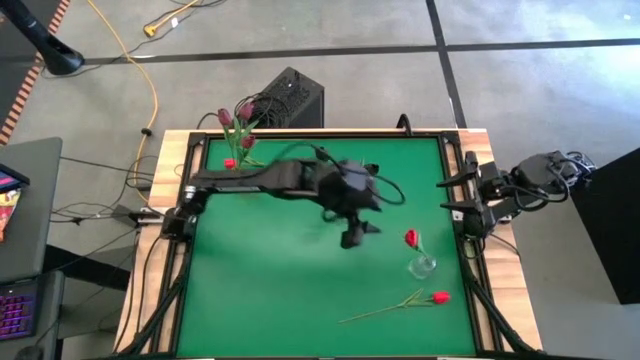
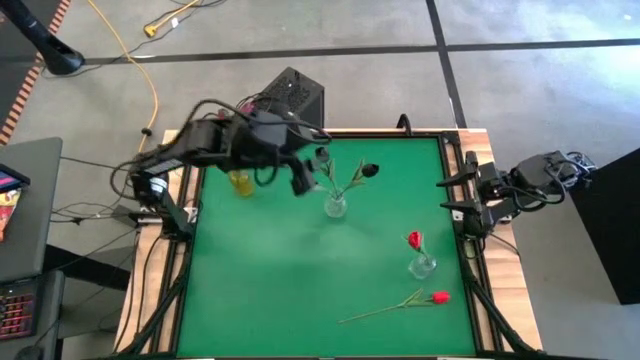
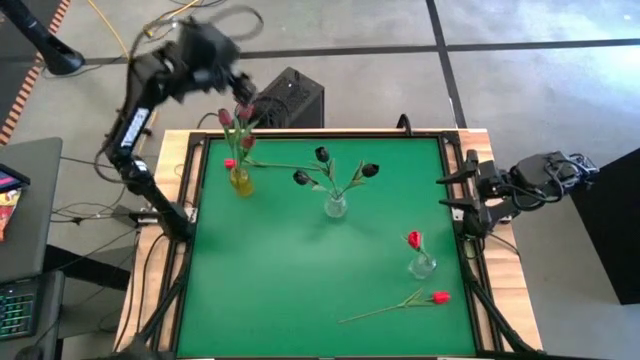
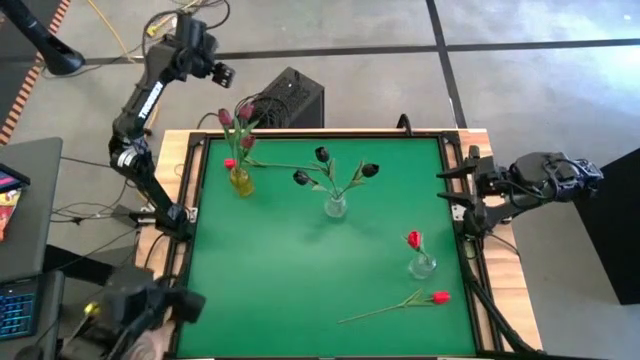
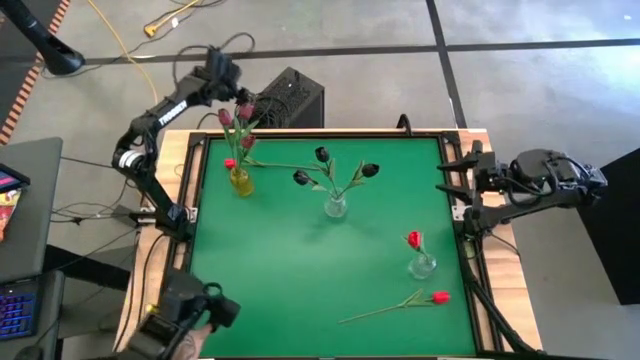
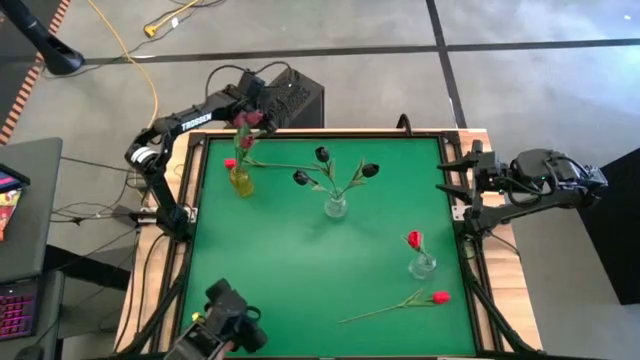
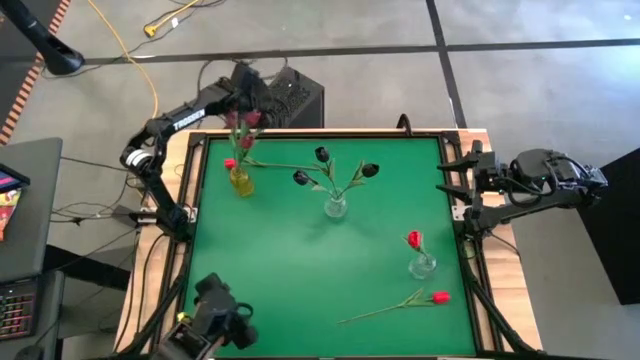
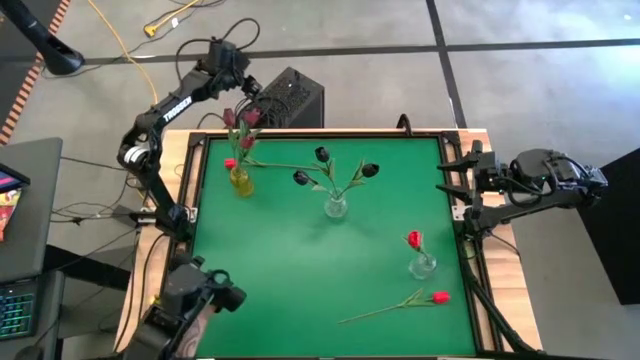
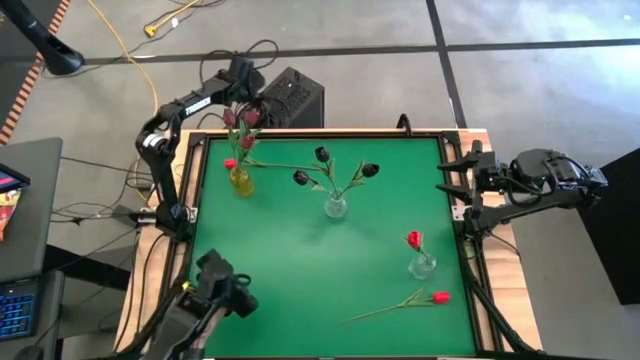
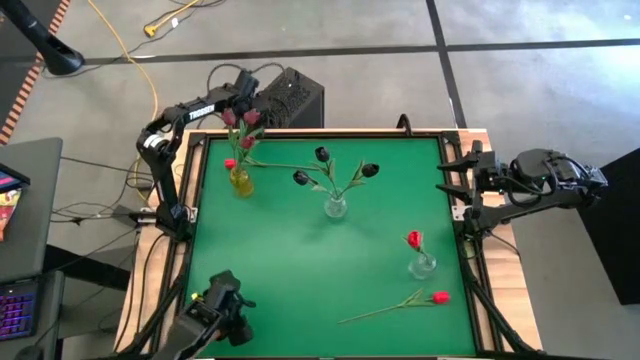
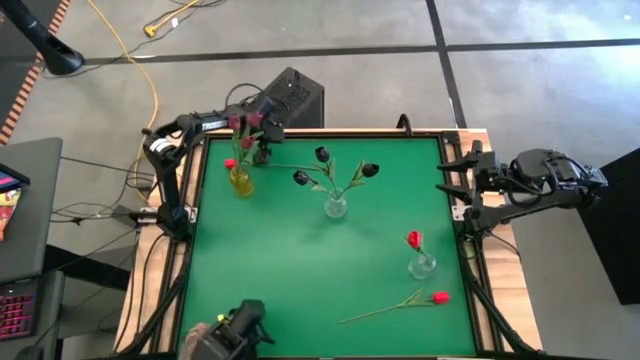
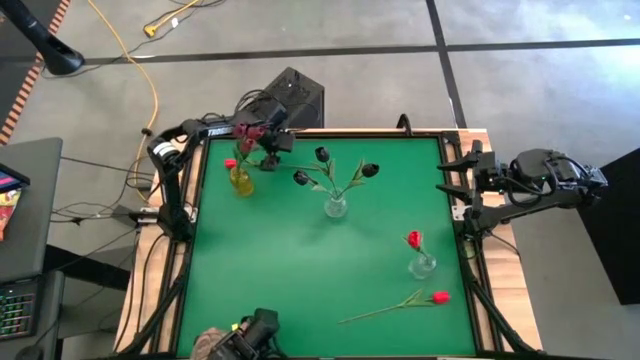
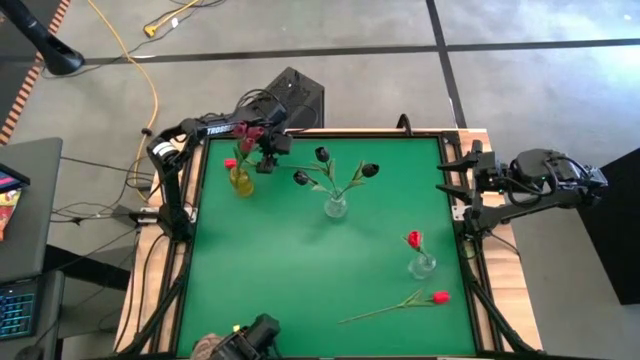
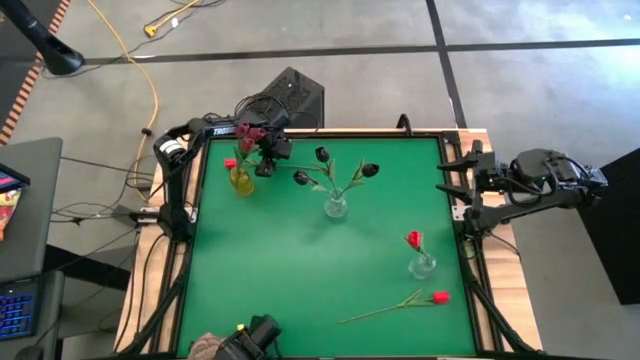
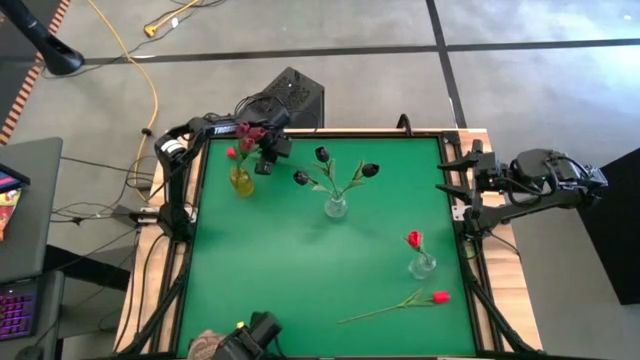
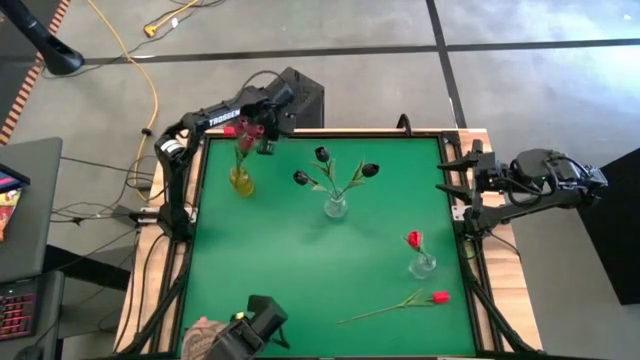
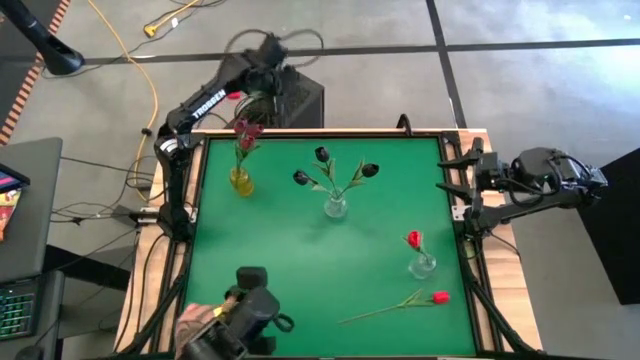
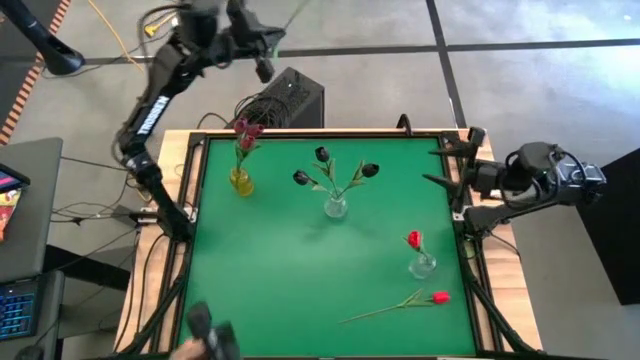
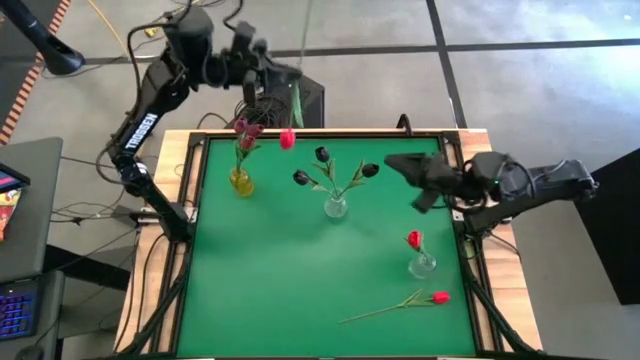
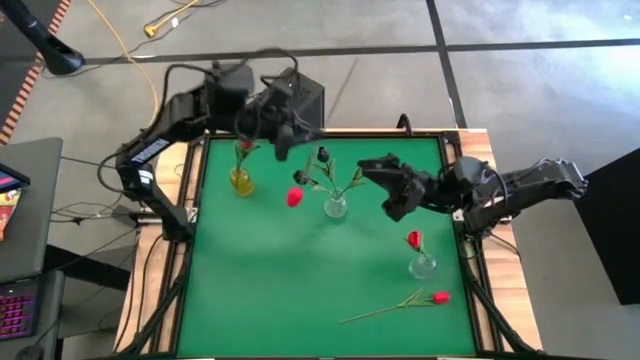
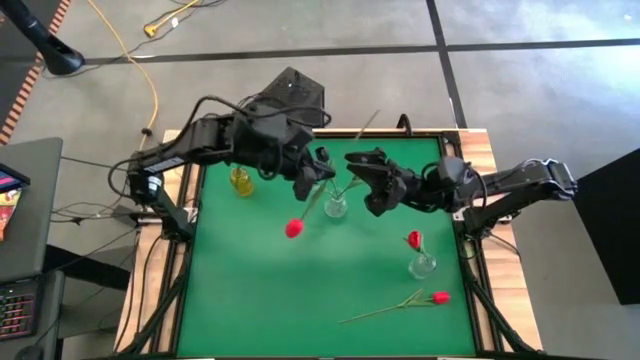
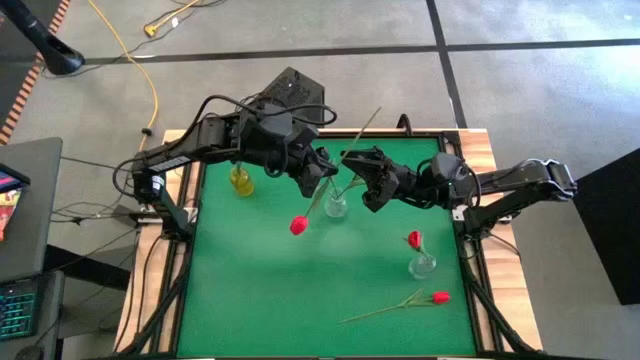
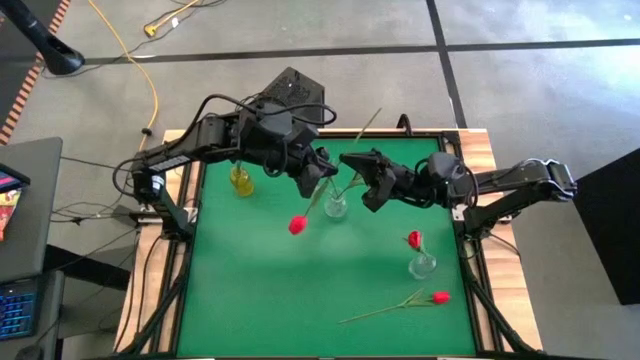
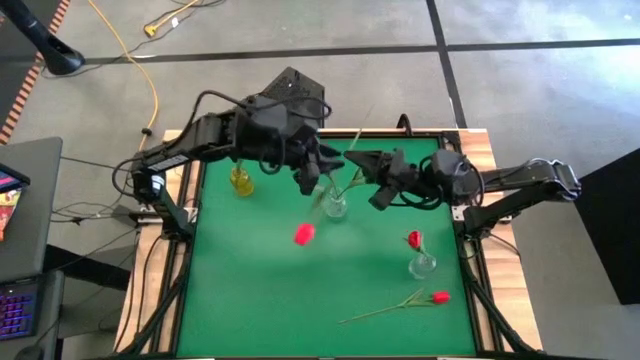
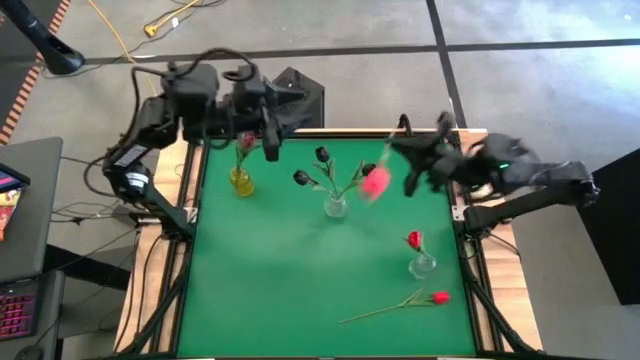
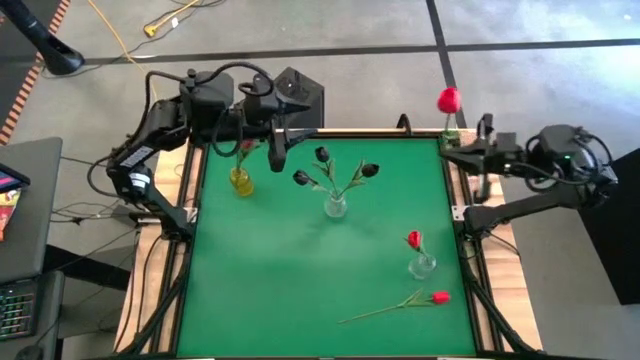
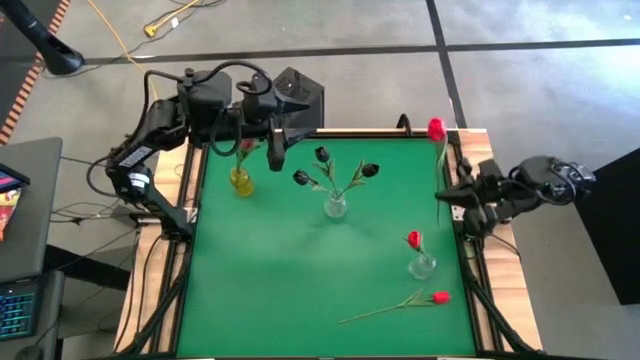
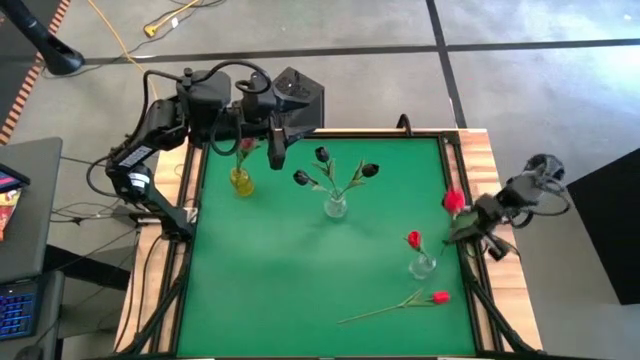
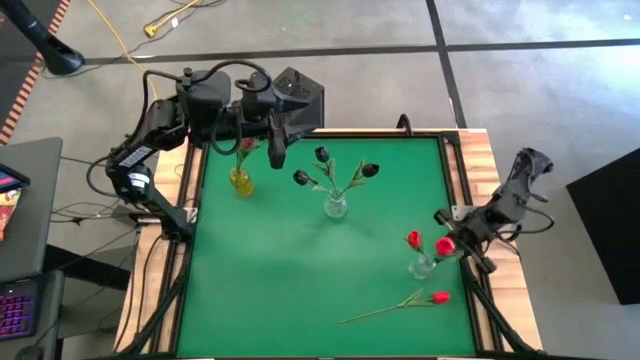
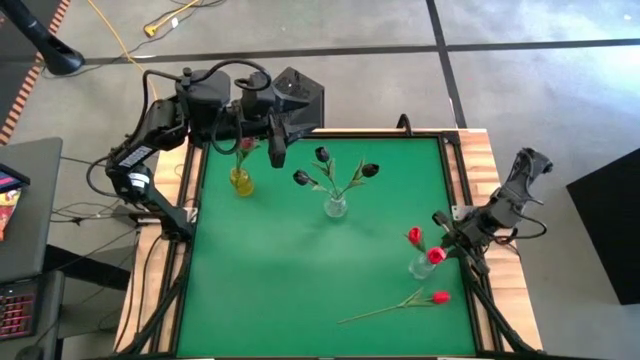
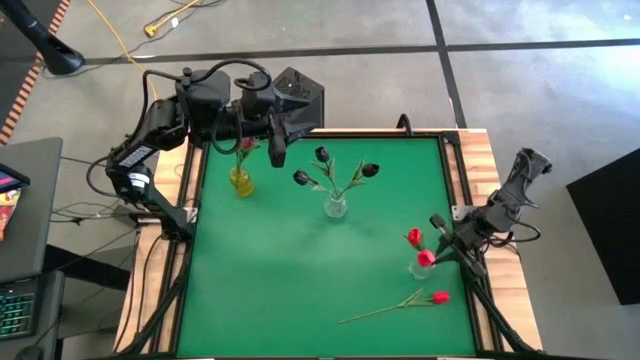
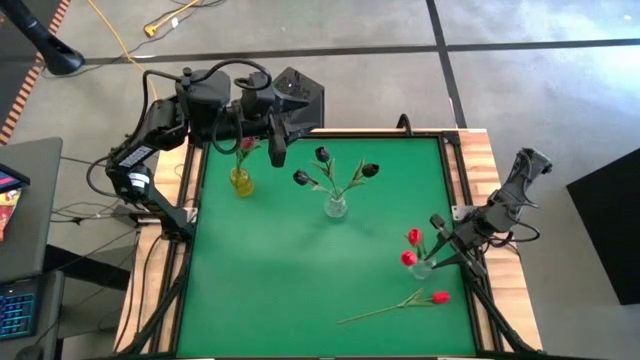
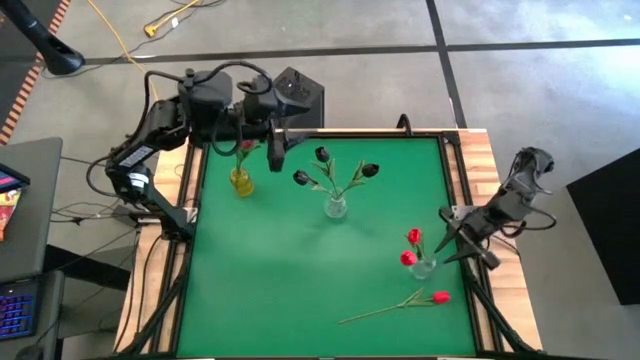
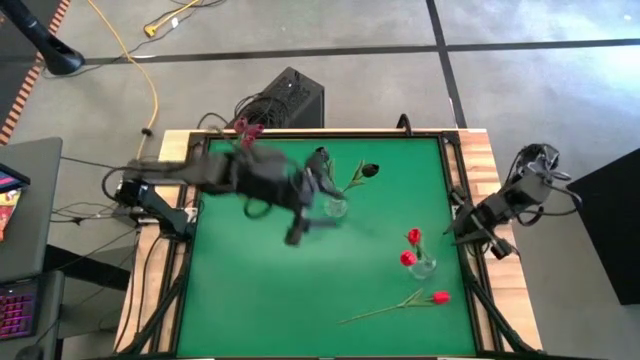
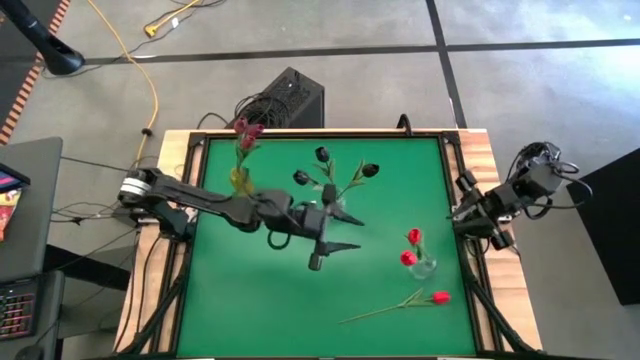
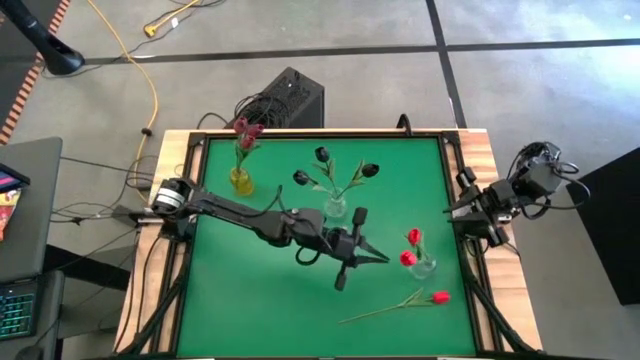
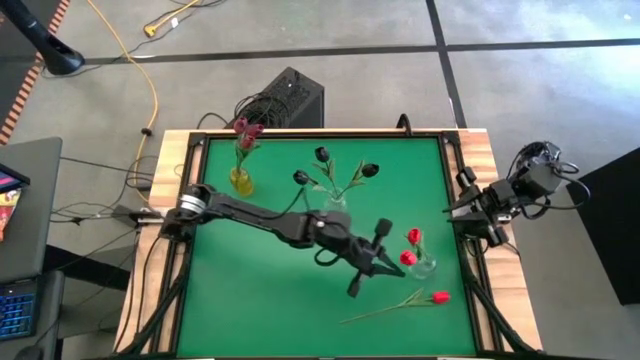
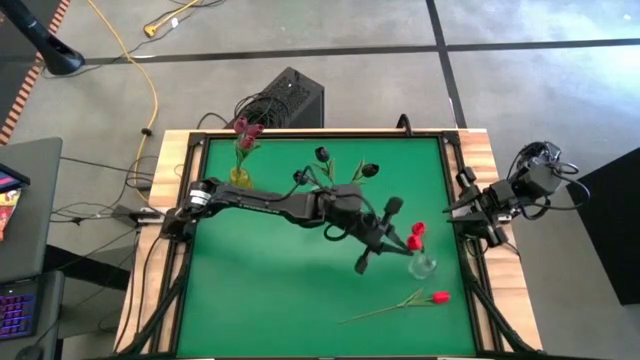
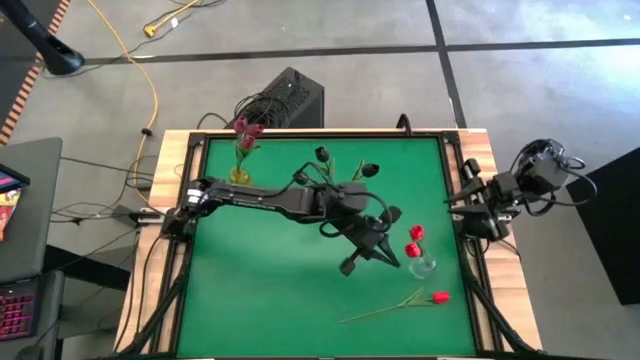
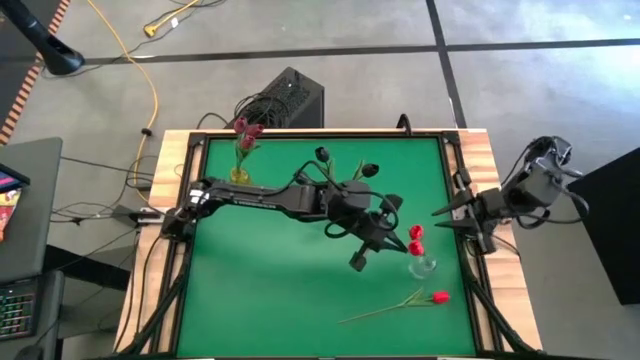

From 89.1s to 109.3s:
Task: Sort flowers into vase by color
Put the top red flower into the right transparent vase

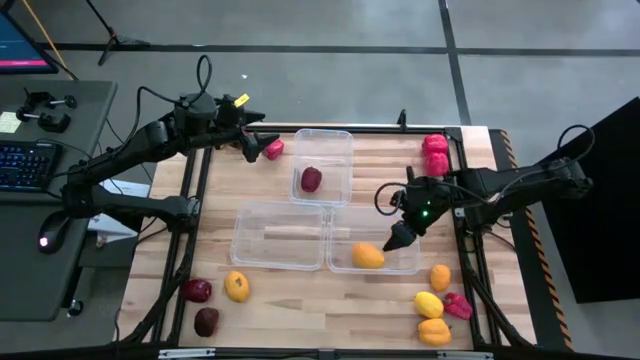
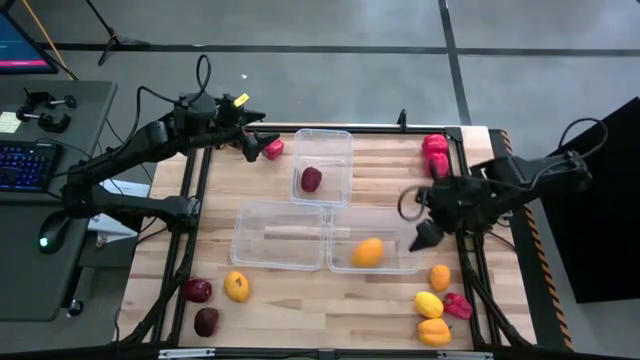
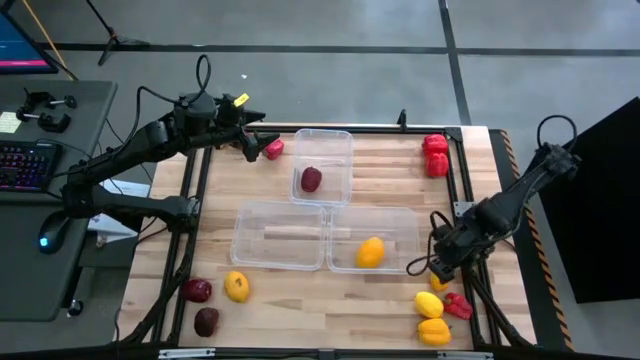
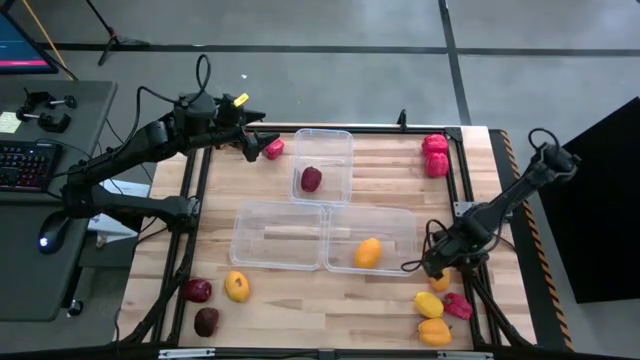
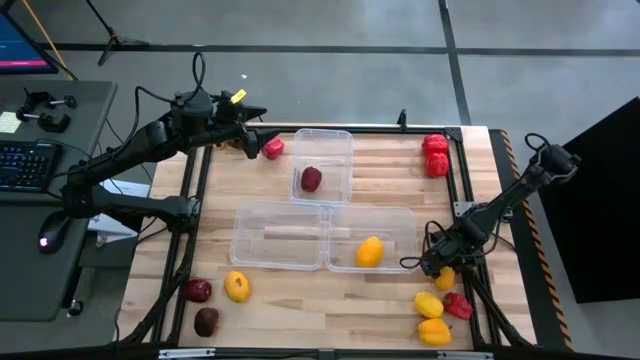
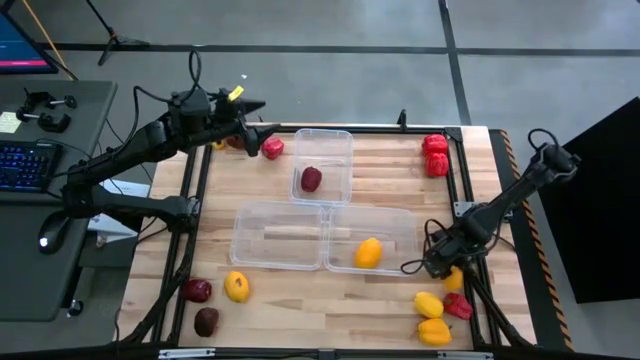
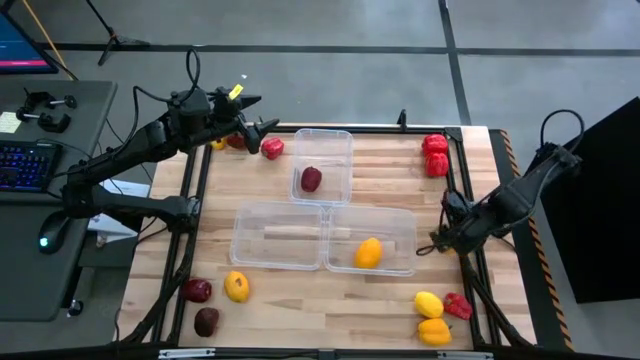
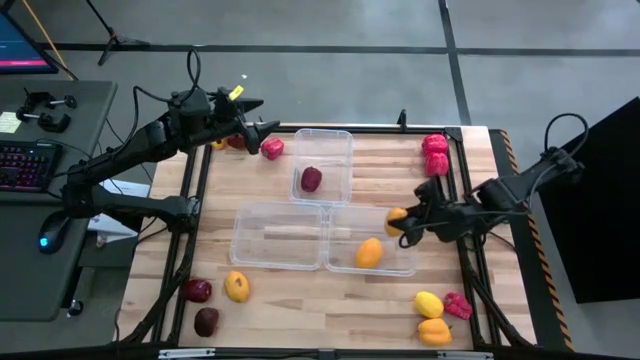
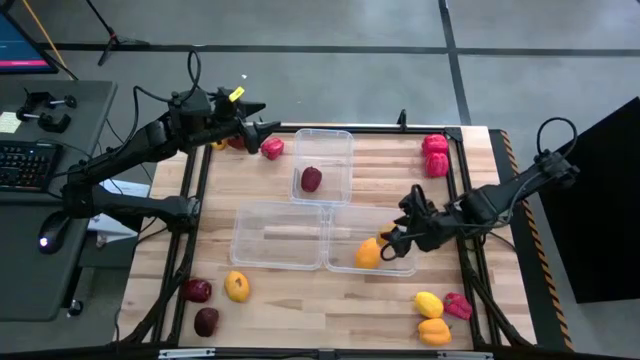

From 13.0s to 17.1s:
Task: Sort produce into baskets
Put the bottom right lemon into the middle right transparent bin
